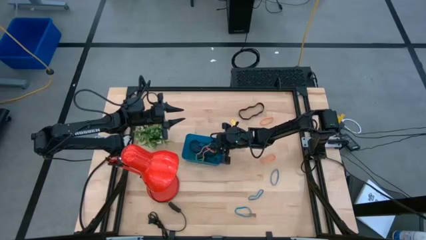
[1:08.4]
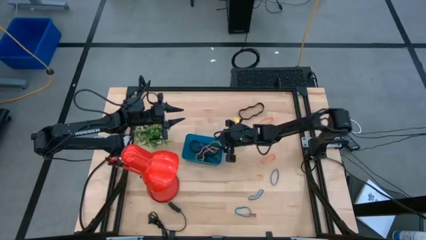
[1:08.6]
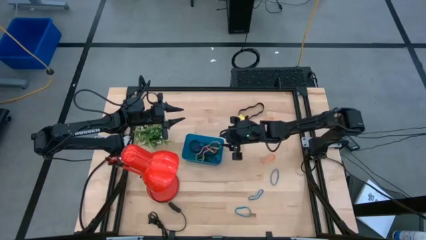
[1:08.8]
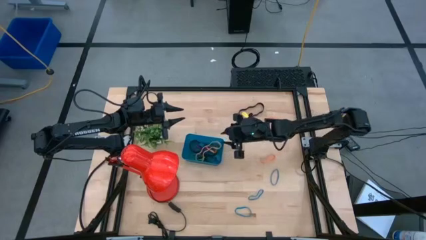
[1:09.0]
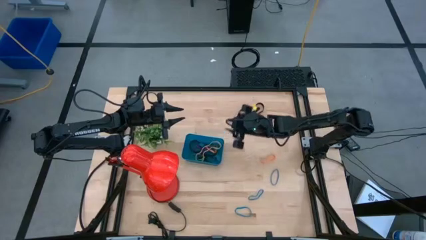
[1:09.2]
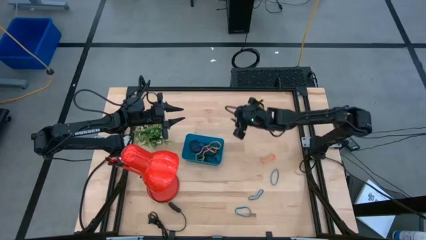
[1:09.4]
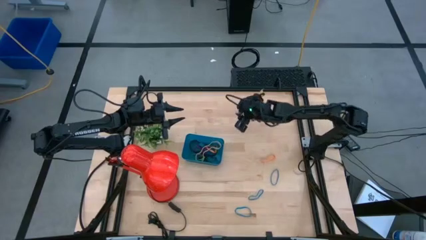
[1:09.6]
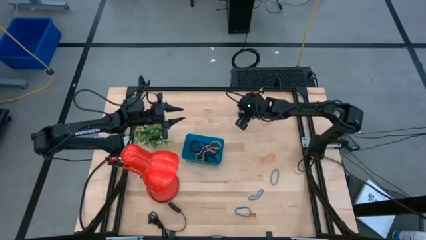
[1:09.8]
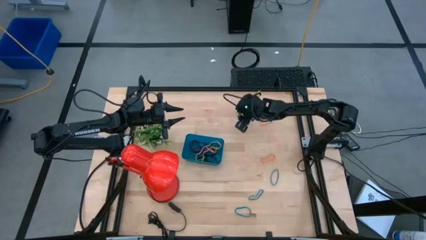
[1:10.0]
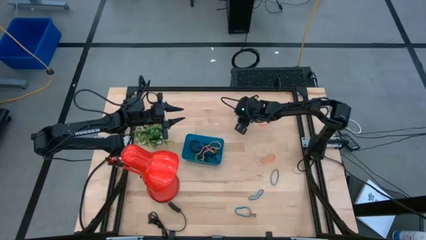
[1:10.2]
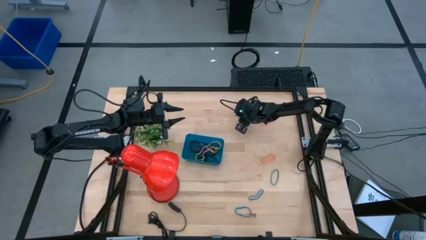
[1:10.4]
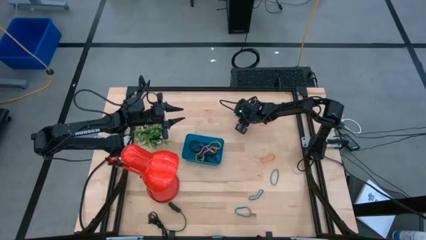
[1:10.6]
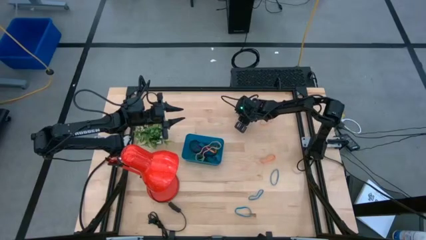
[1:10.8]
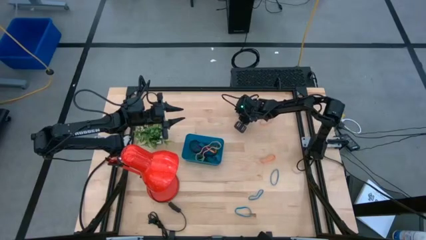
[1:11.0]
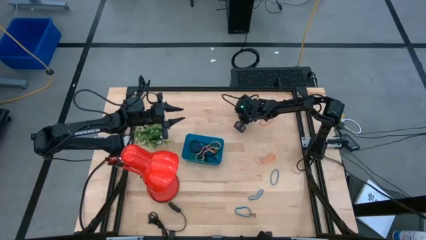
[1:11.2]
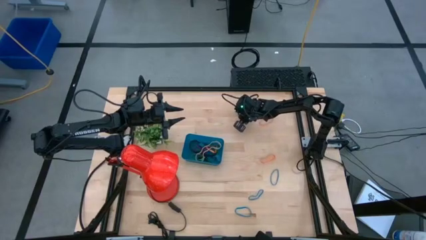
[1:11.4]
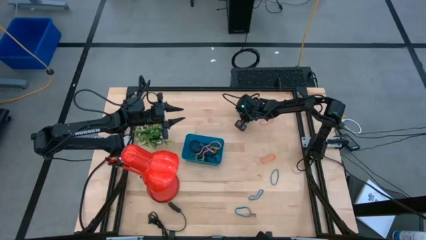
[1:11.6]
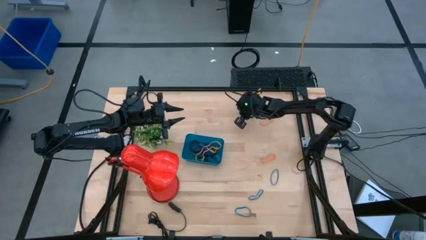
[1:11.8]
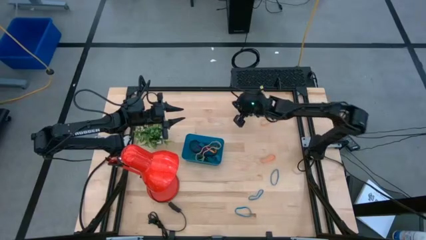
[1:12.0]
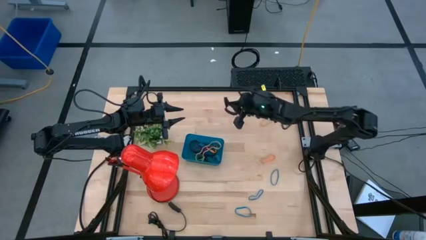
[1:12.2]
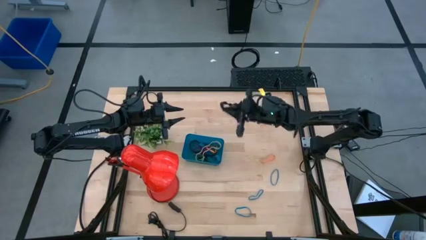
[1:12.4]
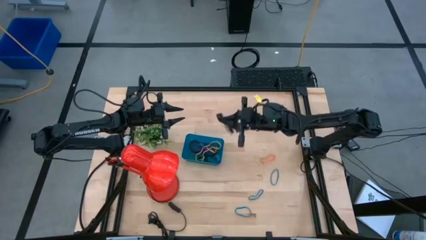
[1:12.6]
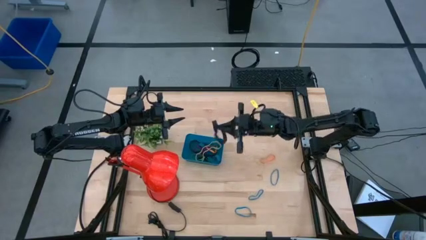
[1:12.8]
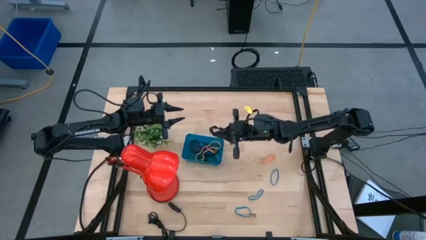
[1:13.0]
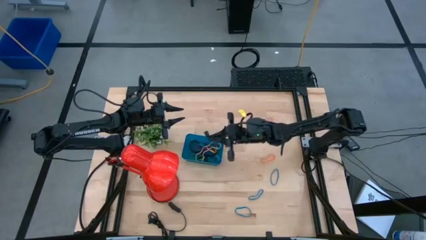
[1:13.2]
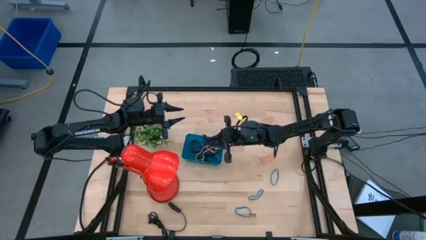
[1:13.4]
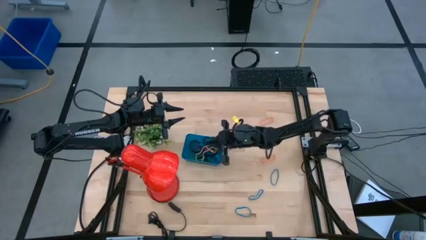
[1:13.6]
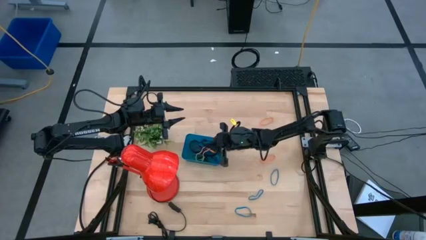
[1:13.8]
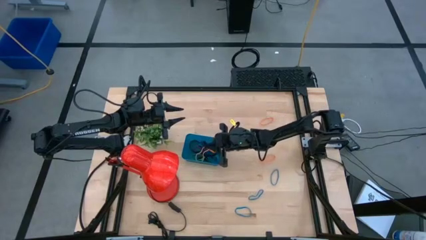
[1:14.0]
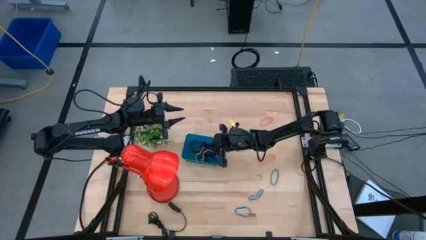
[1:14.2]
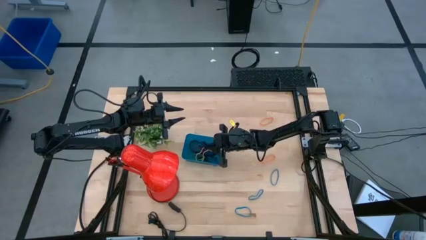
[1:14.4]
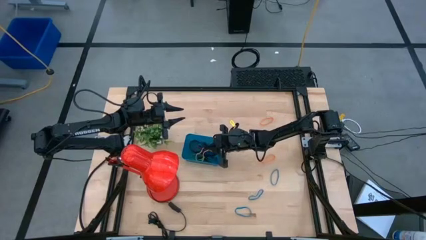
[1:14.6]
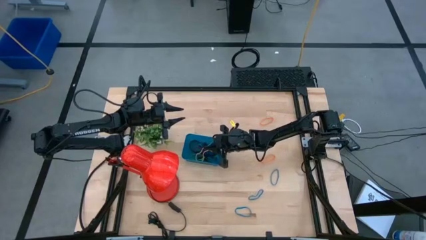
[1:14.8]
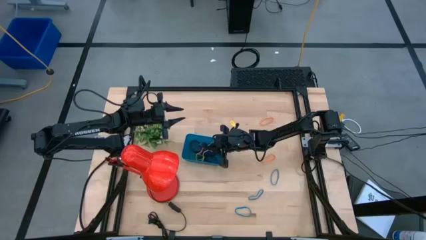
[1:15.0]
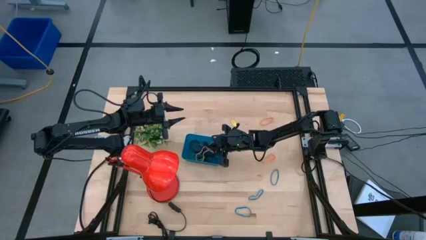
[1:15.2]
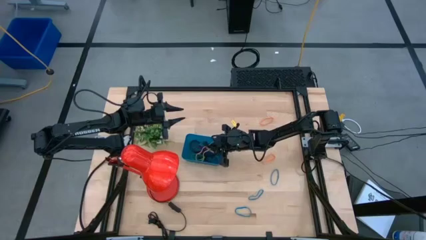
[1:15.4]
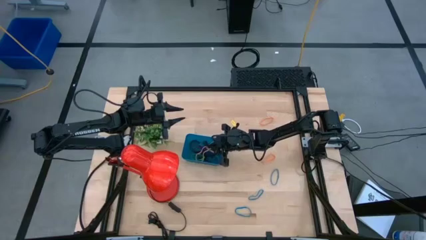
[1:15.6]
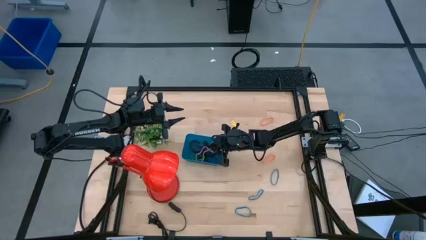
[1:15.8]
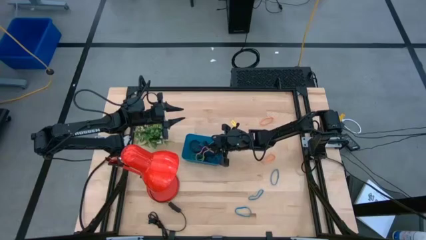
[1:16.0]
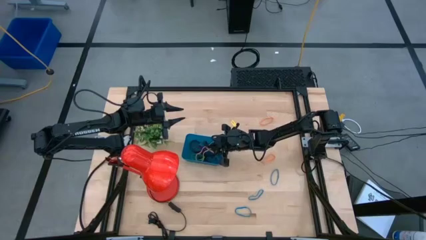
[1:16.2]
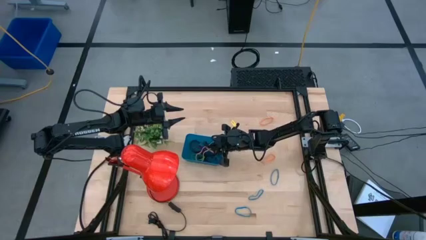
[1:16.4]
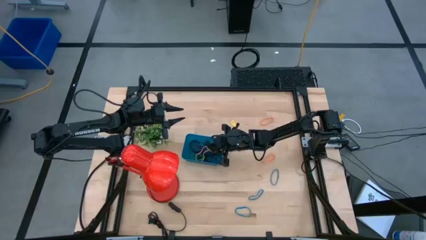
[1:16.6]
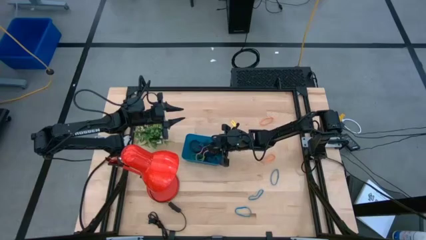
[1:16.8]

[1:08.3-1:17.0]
Task: Pick and place rubber bands into bin
Put the black rubber band into the blue bin

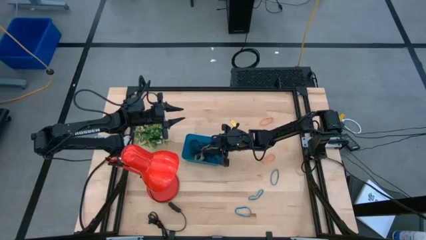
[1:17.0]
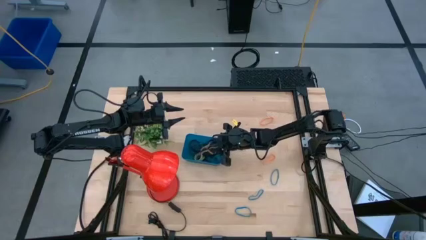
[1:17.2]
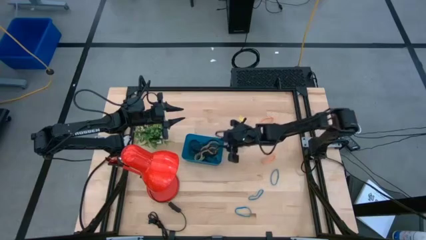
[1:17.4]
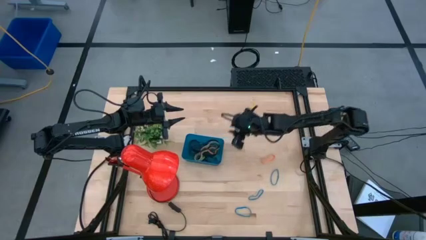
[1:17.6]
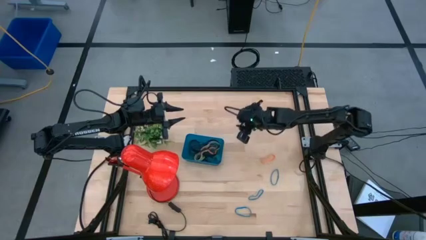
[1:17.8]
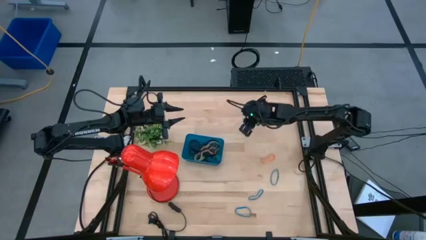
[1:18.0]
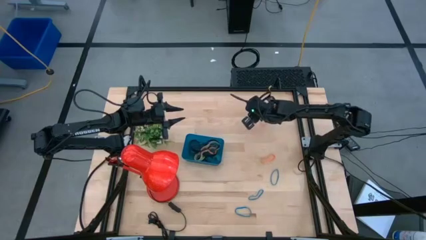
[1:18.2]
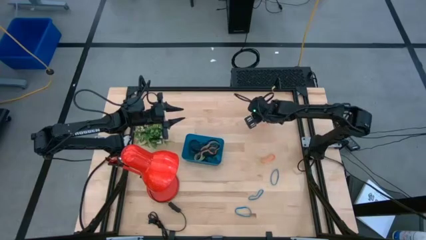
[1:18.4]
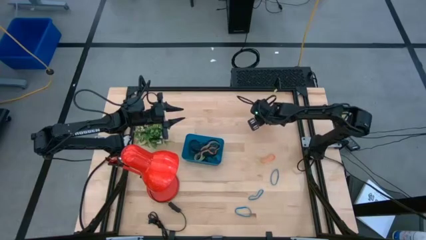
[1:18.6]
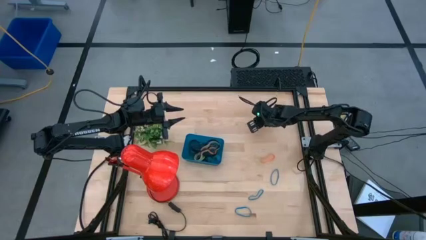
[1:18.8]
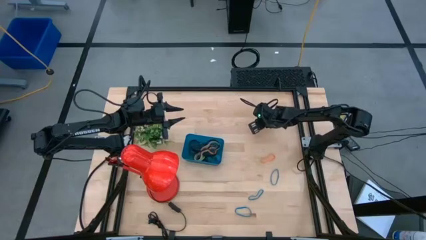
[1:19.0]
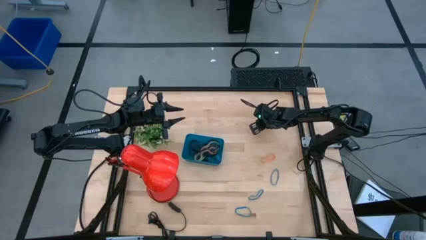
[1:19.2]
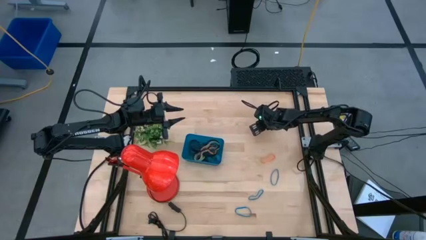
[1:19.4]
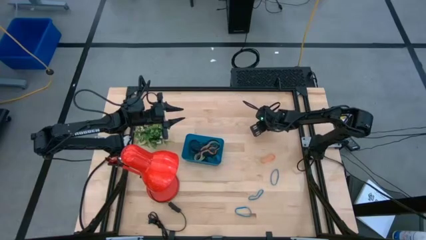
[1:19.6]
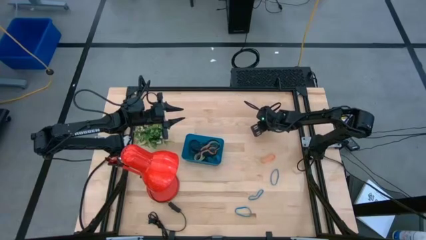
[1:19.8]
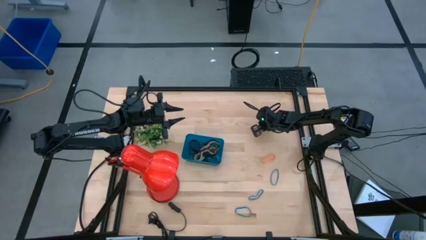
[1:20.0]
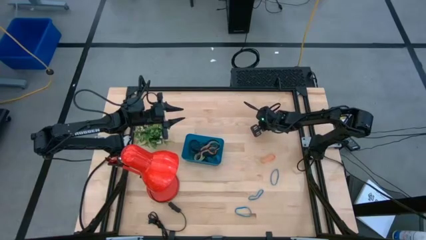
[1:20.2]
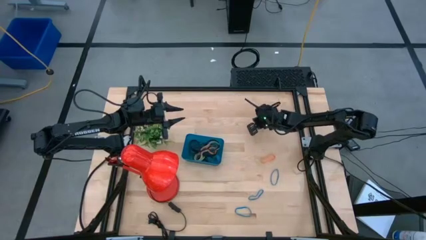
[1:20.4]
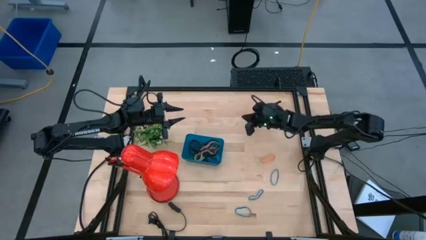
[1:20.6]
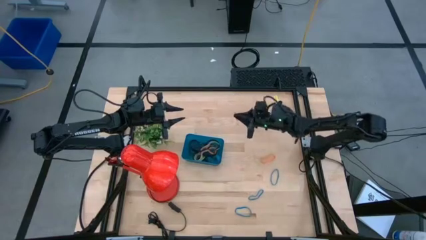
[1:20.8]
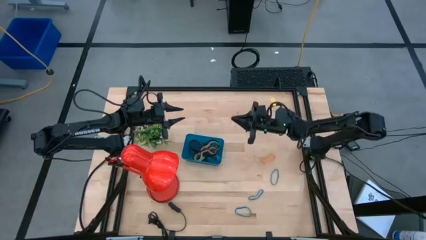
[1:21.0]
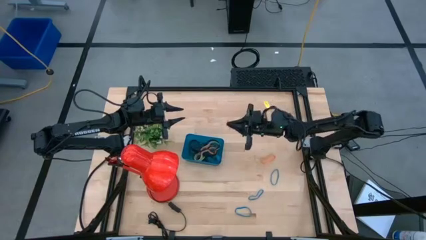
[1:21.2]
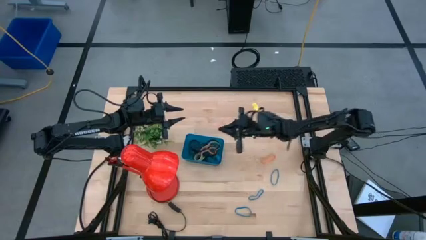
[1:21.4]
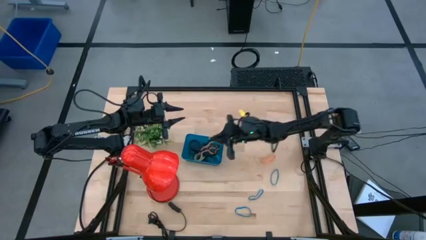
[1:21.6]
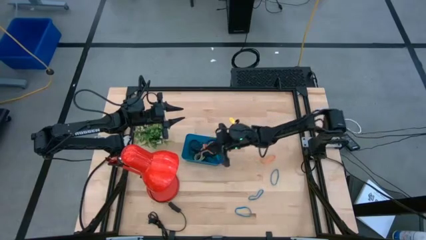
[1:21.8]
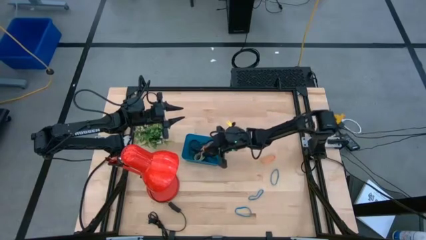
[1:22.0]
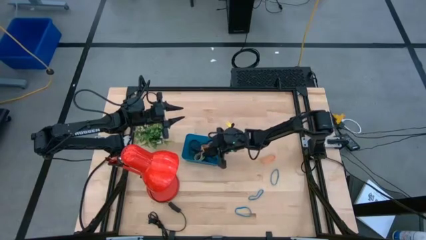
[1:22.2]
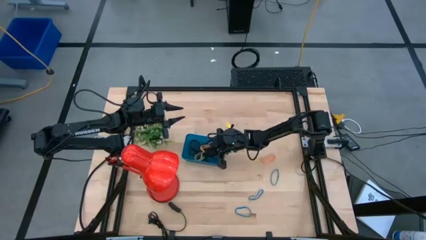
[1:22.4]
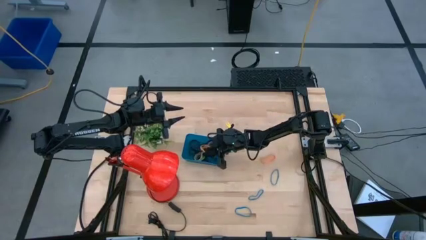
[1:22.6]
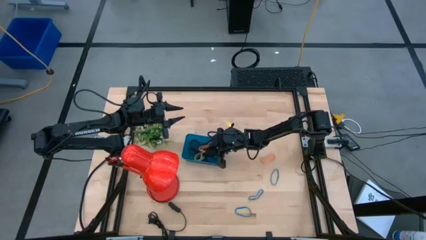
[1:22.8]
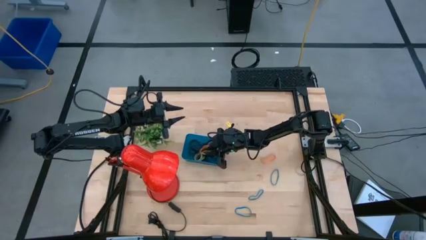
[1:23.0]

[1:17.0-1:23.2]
Put the orange rubber band into the blue bin

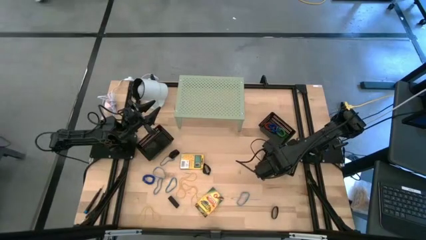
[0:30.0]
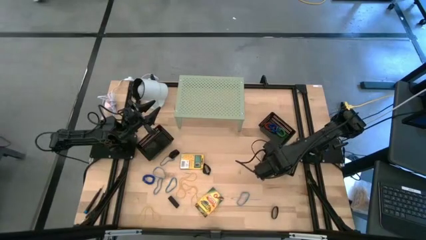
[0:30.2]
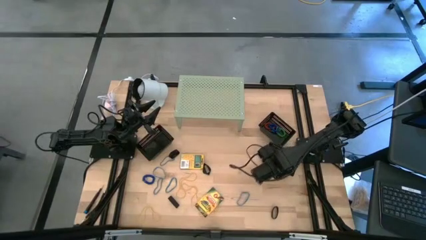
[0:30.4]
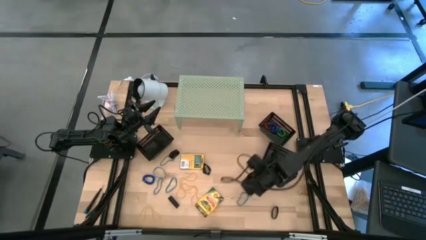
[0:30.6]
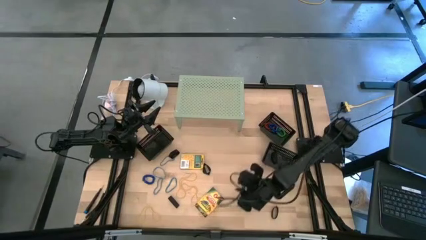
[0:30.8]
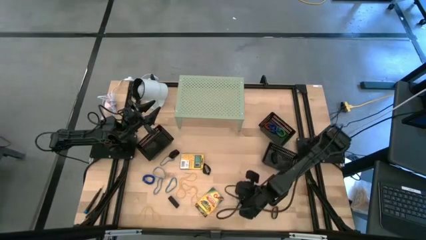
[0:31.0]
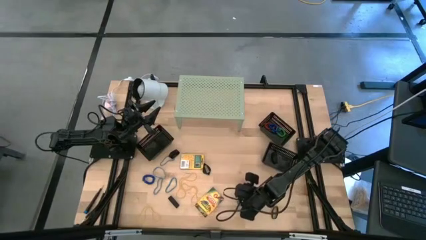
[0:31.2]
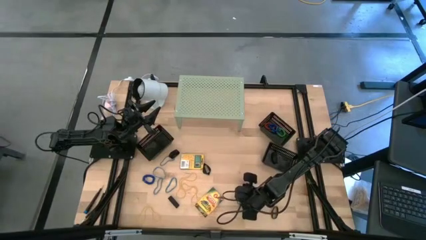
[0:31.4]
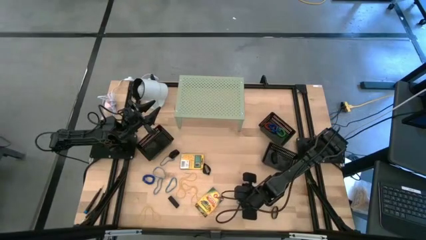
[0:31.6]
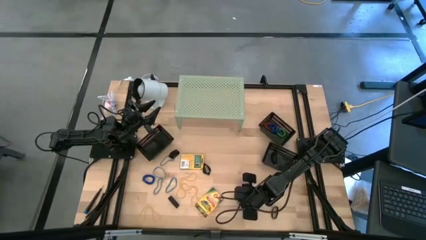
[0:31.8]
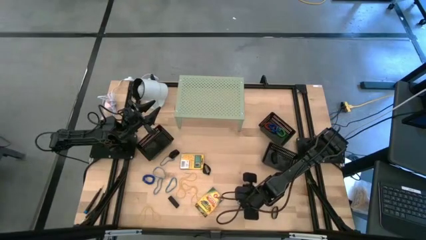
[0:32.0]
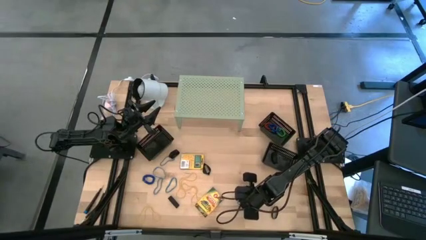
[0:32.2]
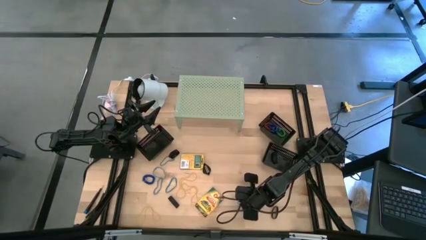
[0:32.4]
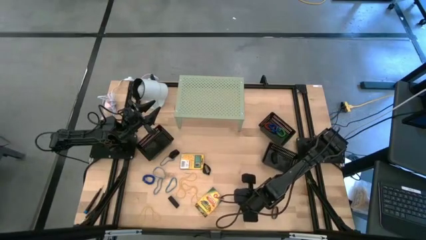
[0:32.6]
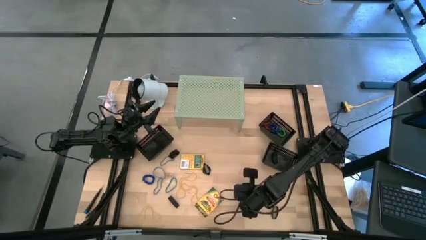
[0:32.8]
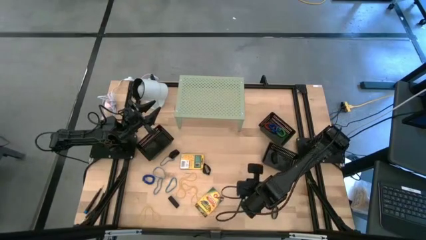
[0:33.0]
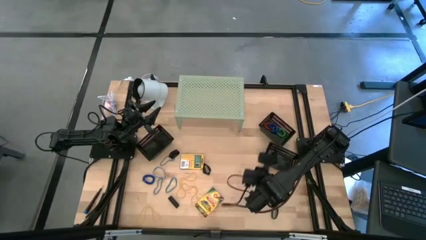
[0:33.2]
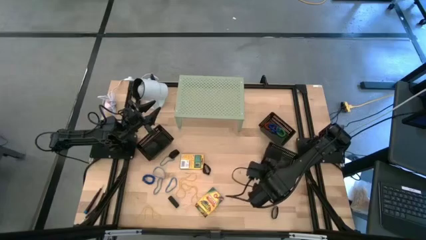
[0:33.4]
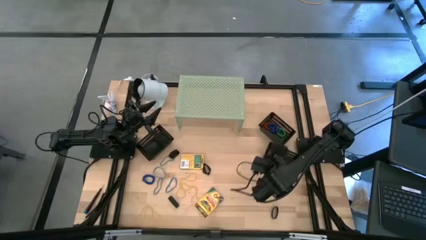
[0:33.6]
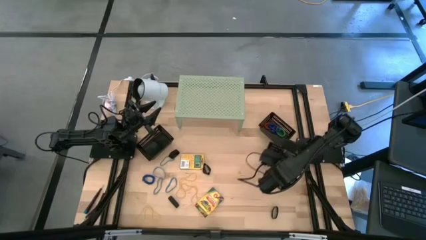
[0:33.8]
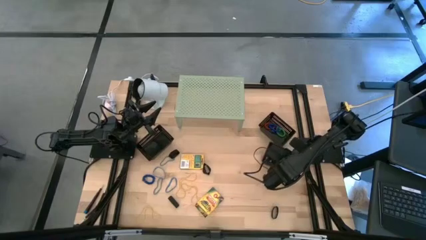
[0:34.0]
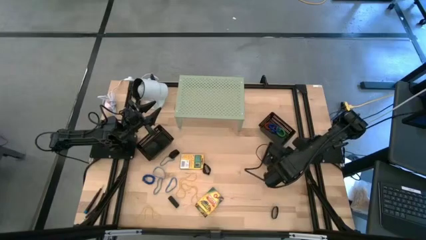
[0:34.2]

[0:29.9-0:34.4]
Task: Pick & Place Office Desk Supplies
Put the blue rubber band into the bottom right black bin
